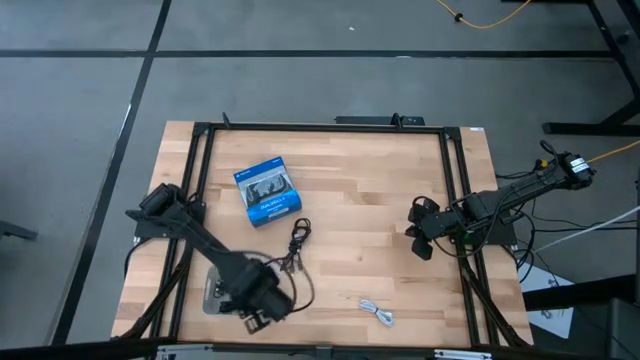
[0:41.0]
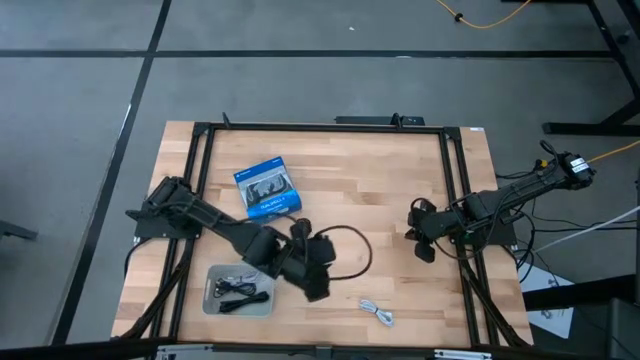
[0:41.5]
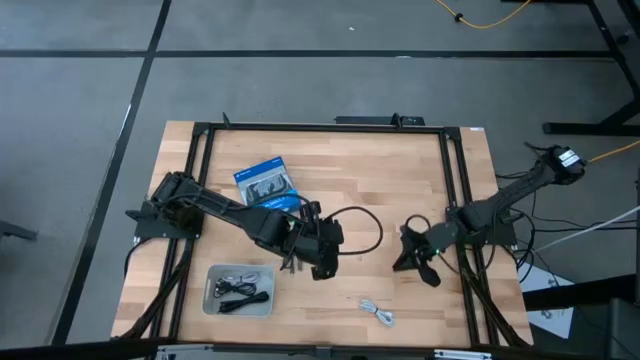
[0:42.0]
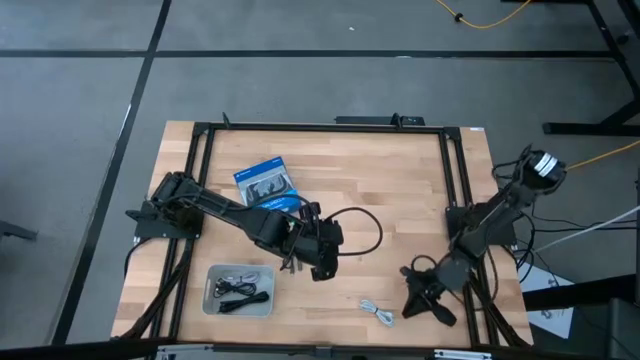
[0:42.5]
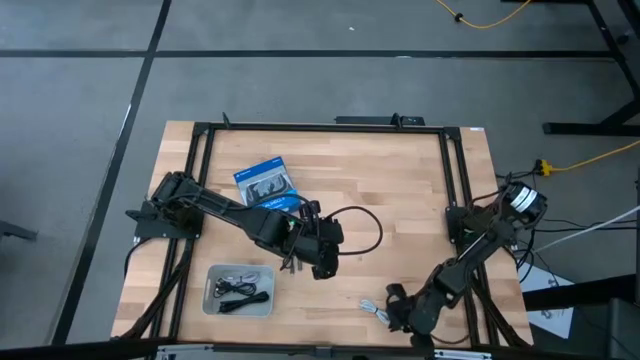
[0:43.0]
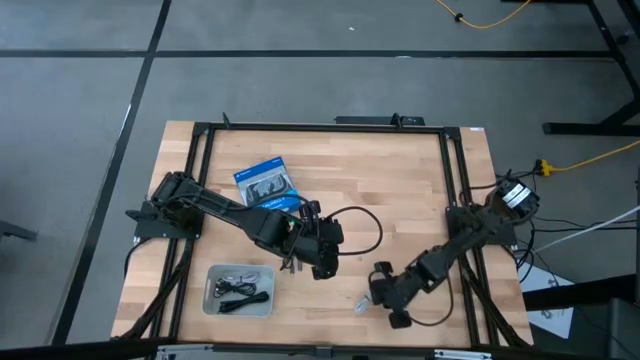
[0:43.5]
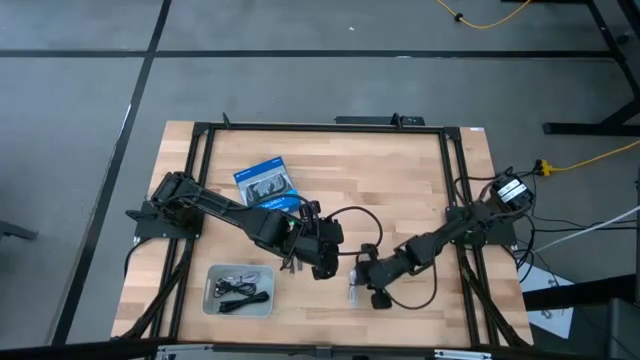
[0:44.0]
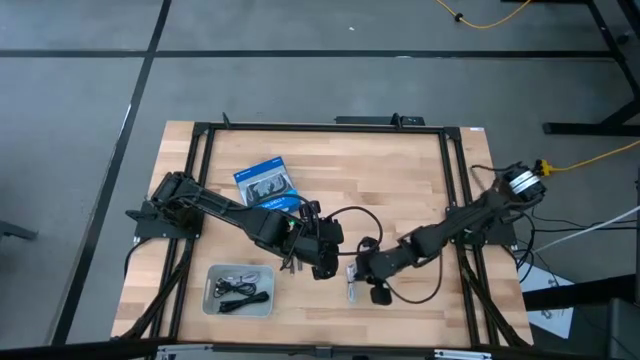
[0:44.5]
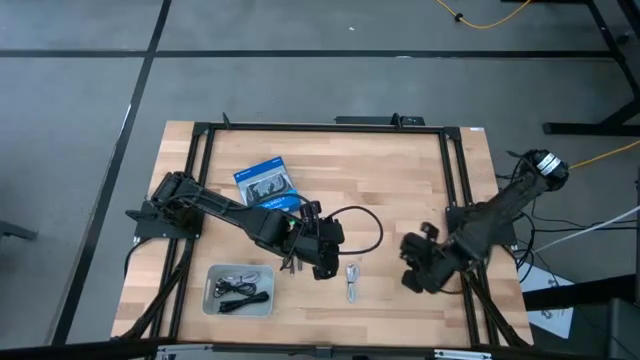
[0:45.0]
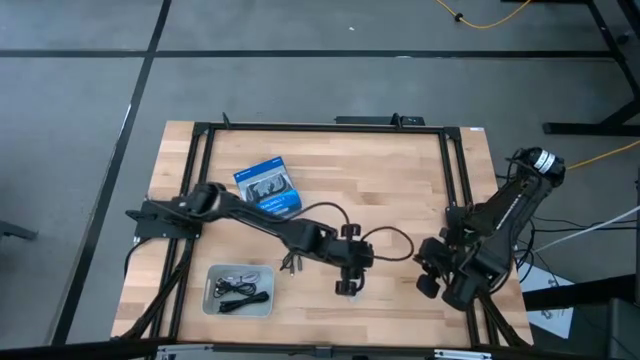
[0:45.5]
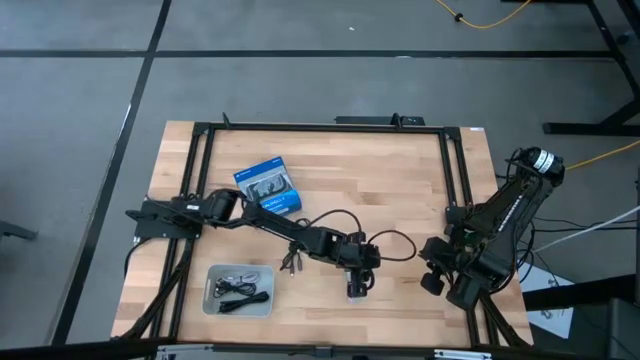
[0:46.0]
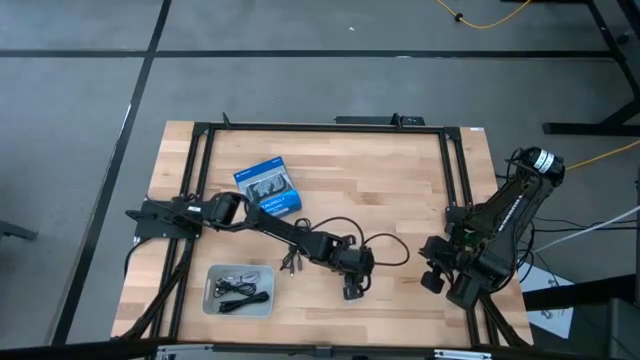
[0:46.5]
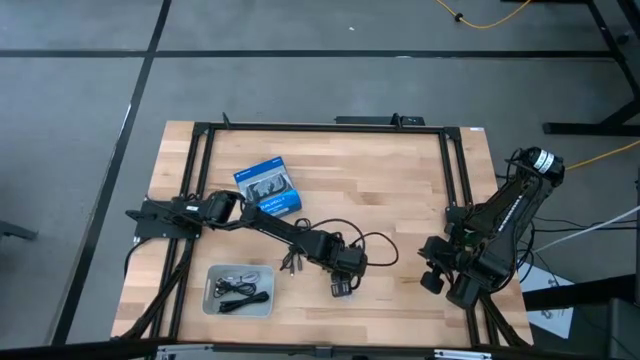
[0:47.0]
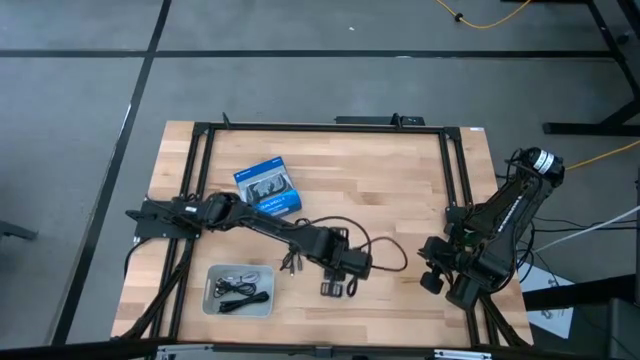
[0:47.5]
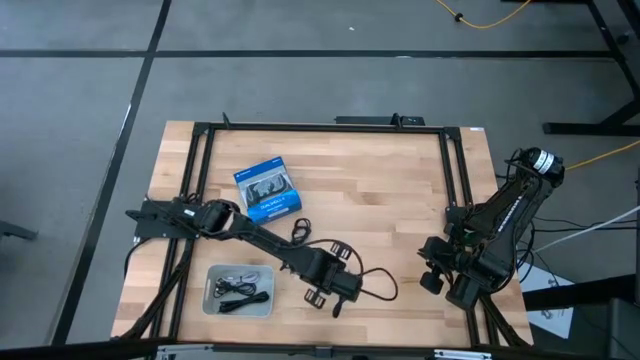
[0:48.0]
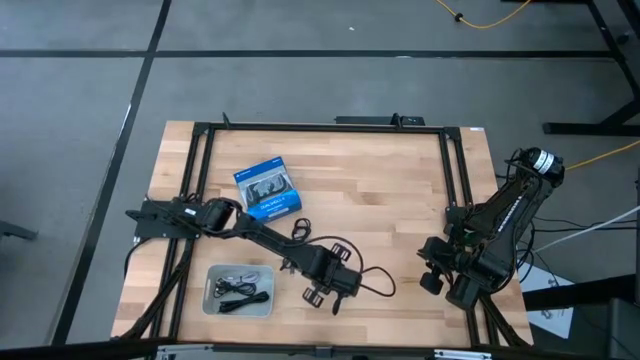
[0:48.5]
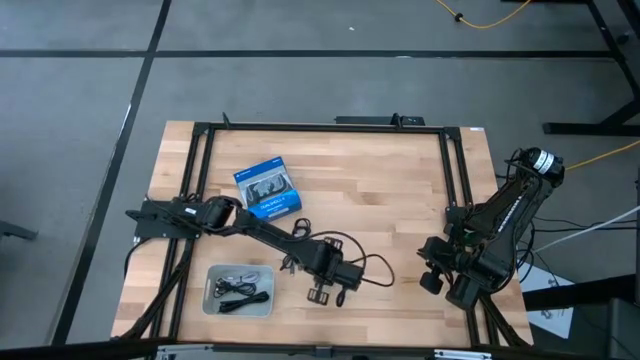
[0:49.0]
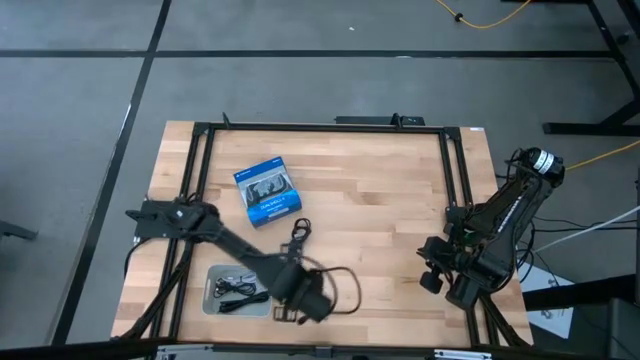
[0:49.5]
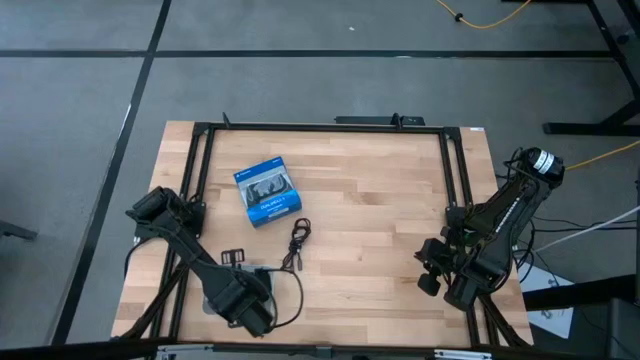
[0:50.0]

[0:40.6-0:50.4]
Task: Pick and place USB-C Cables
Put the white usb cable into the white bin

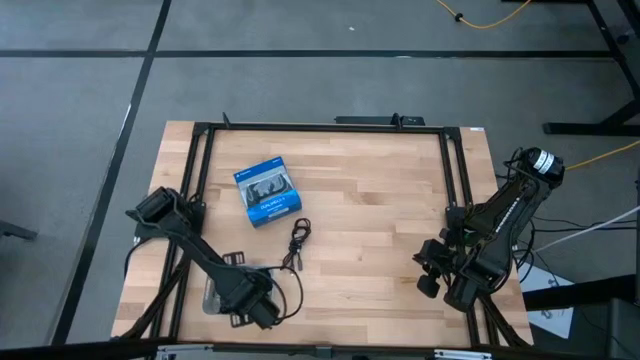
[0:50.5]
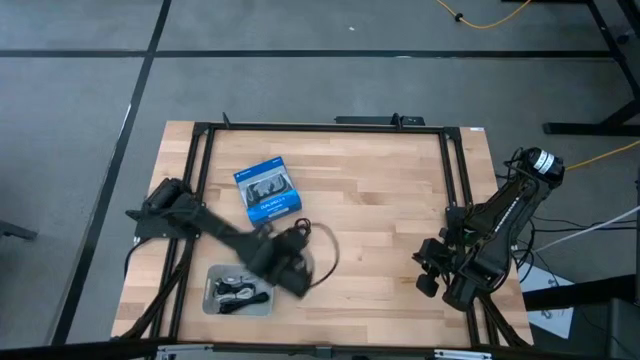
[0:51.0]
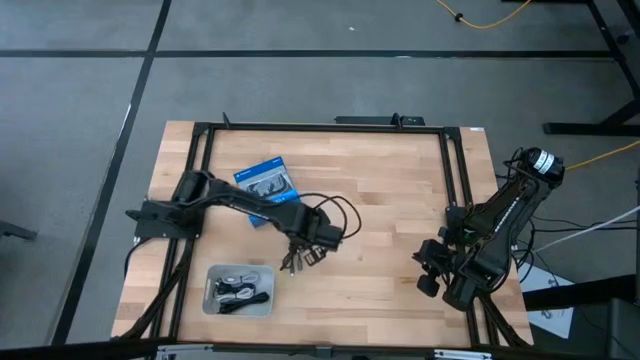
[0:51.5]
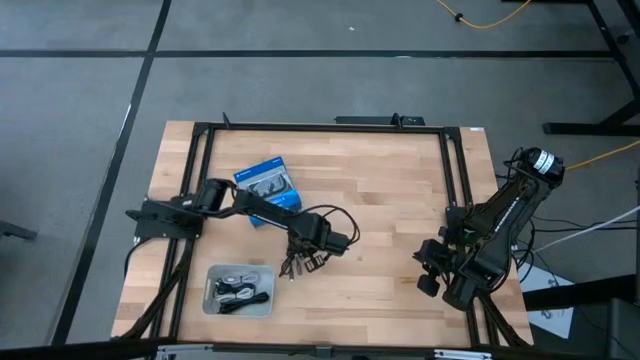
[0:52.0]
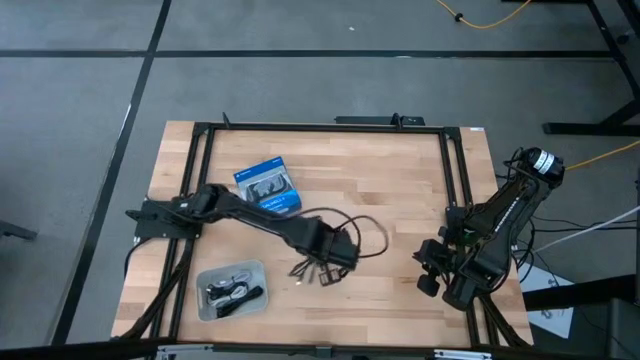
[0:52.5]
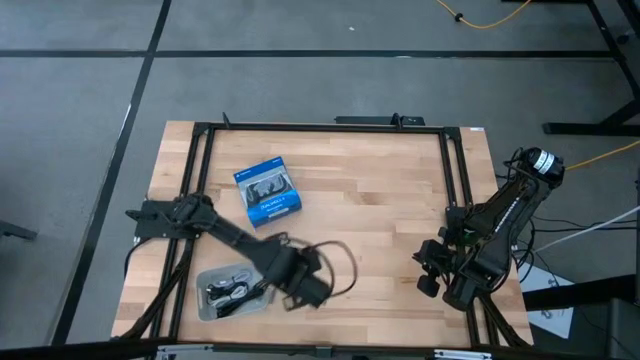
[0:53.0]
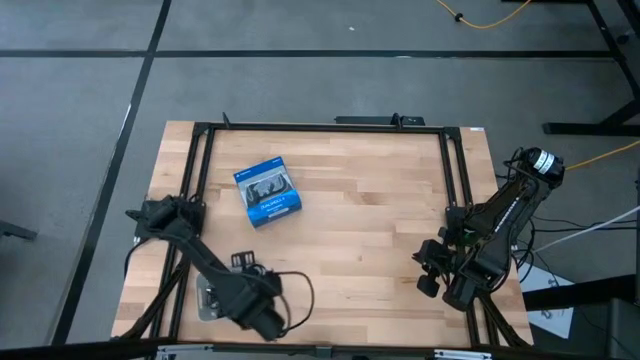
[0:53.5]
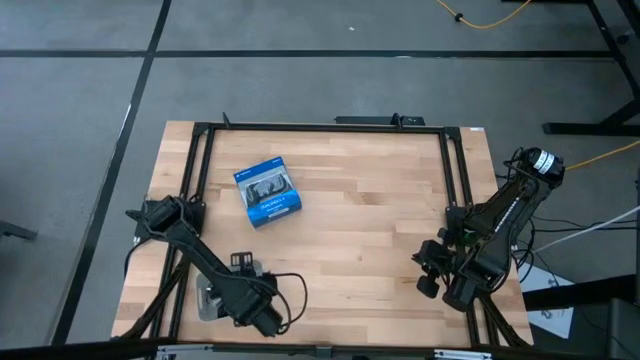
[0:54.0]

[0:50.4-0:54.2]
Put the black usb cable into the white bin

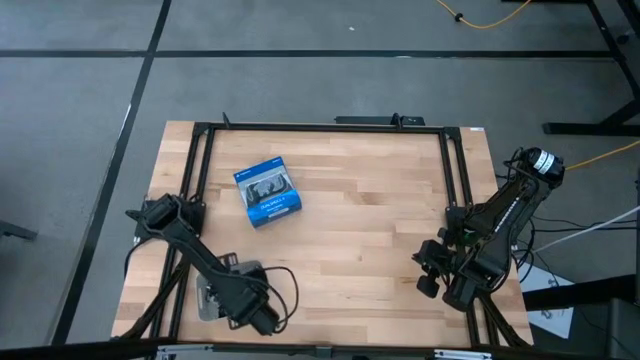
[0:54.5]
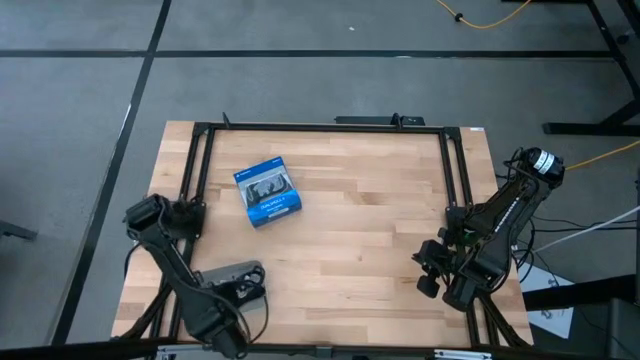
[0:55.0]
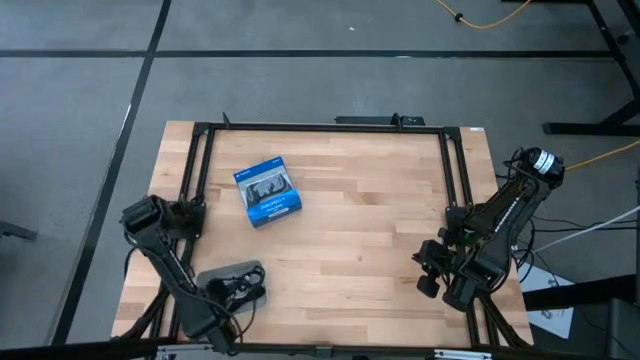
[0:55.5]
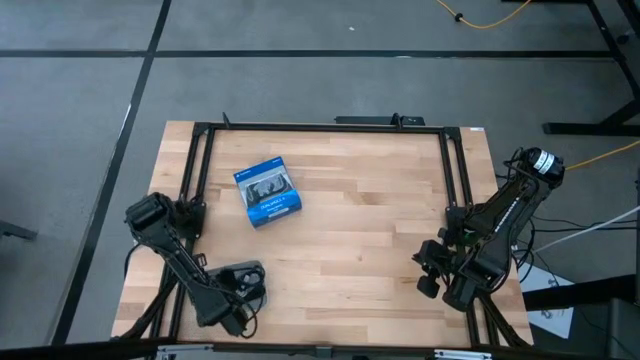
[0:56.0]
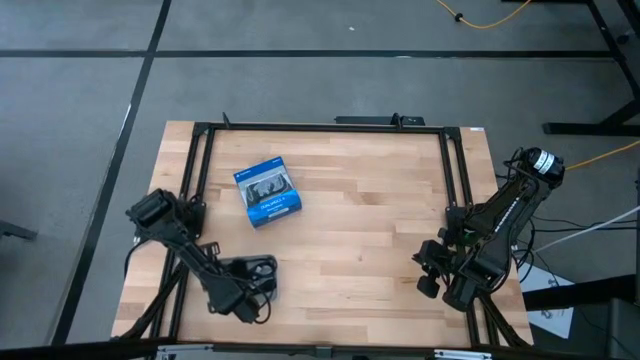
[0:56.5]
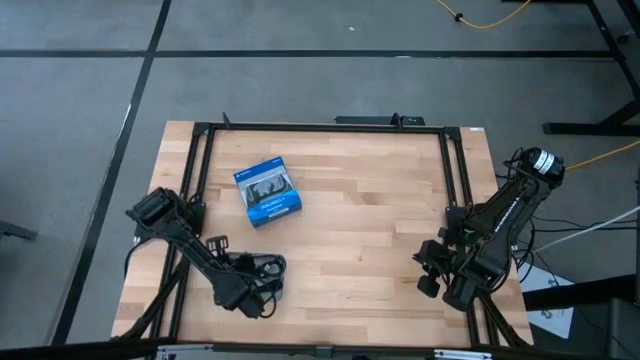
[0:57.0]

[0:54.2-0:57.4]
Adjust the white bin

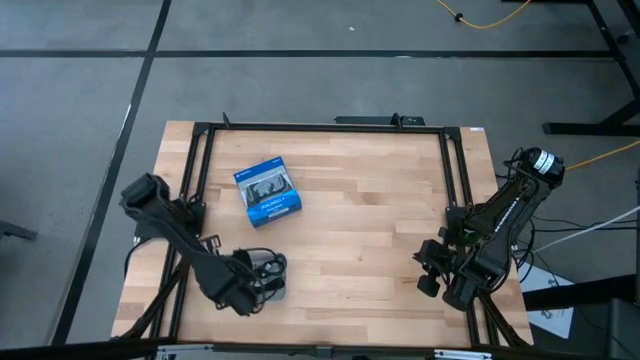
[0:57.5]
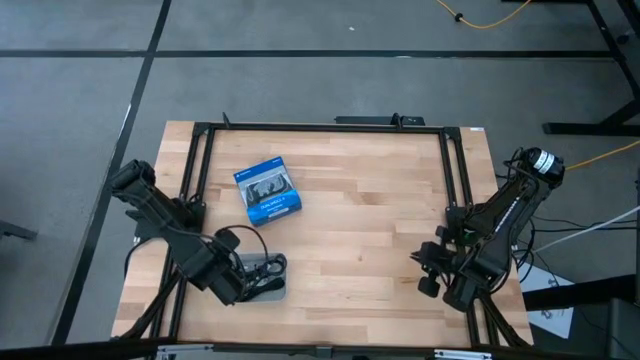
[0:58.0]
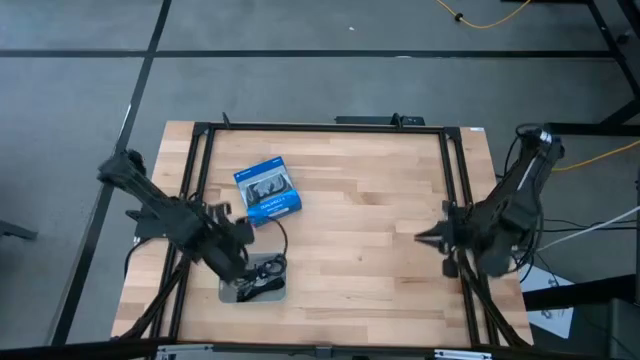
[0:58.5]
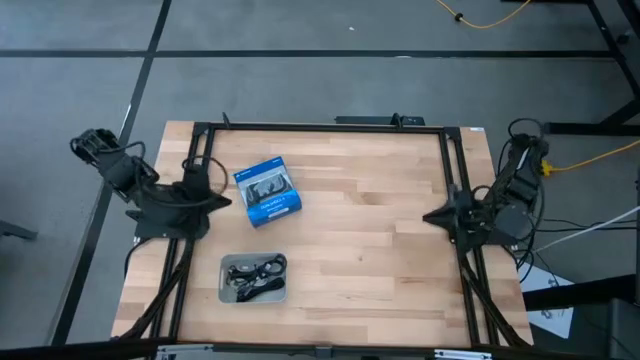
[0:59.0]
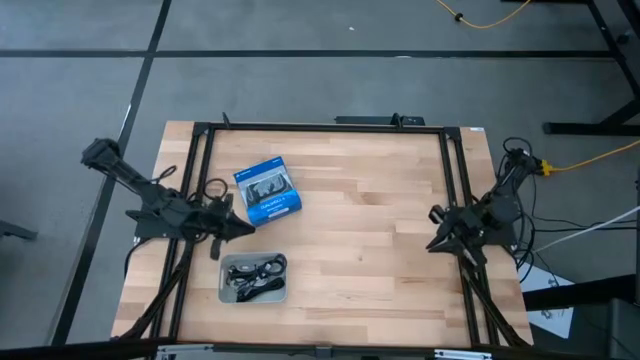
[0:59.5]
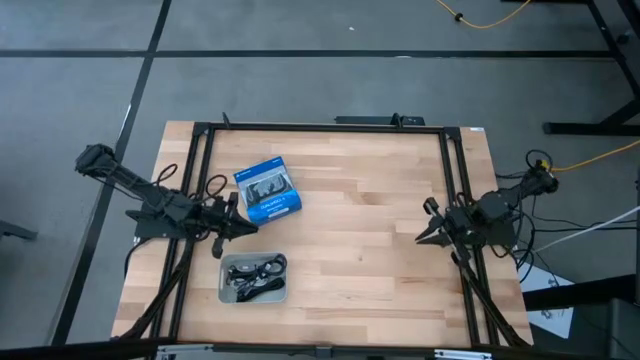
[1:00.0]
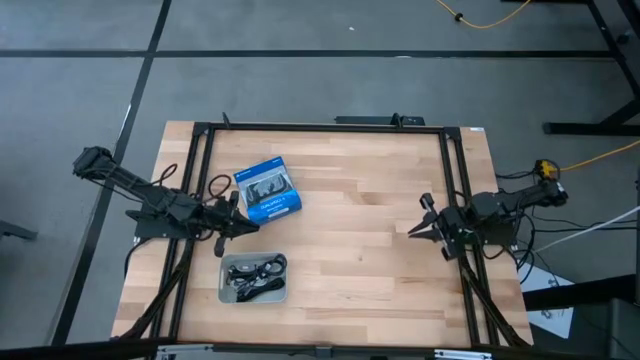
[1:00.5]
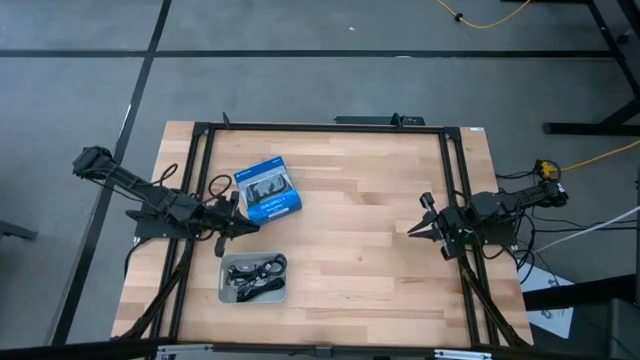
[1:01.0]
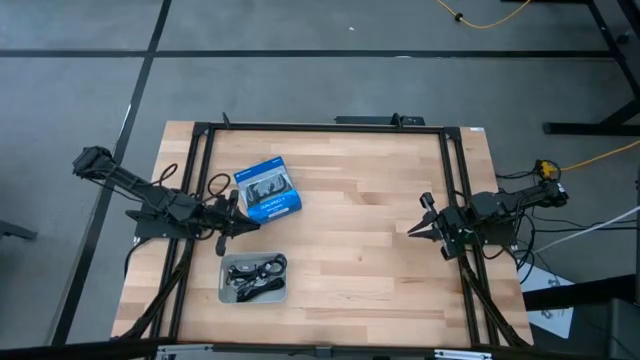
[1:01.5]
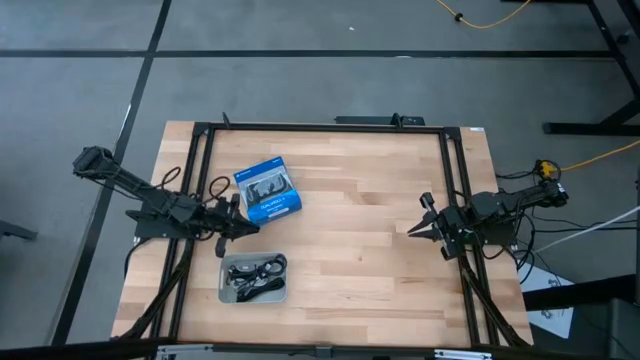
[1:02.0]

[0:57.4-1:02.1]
Return to Home Position
